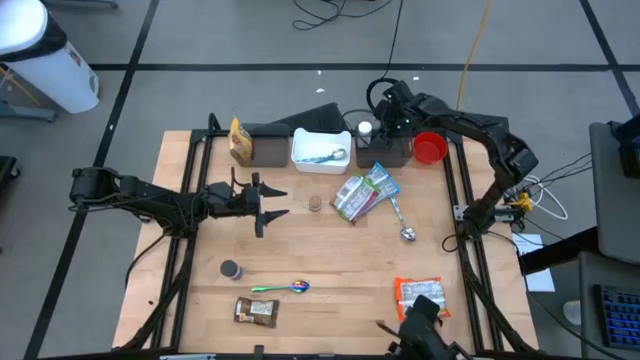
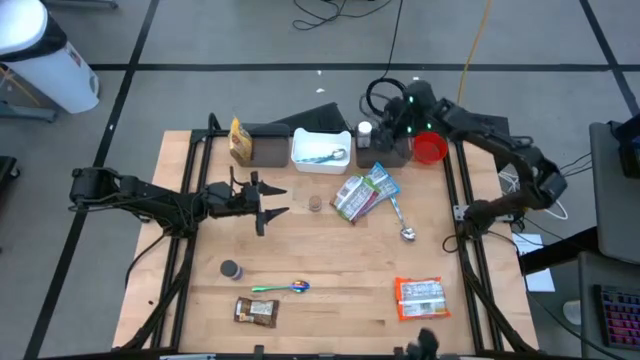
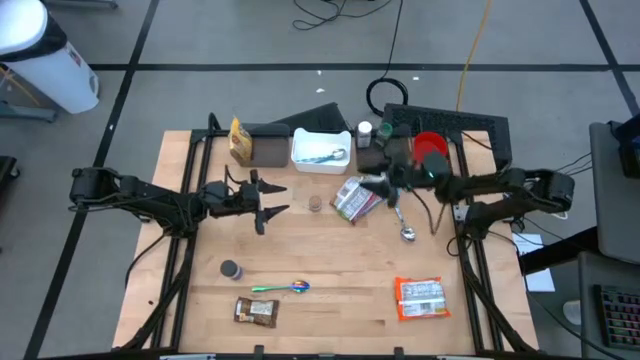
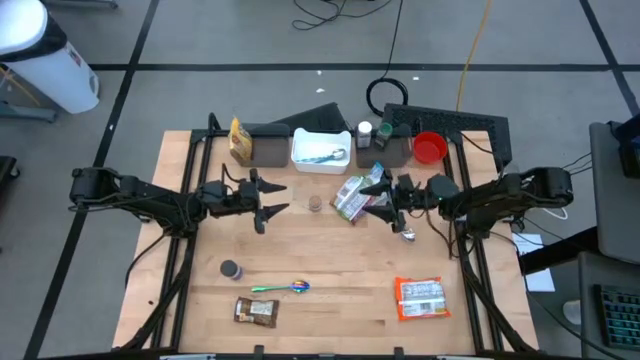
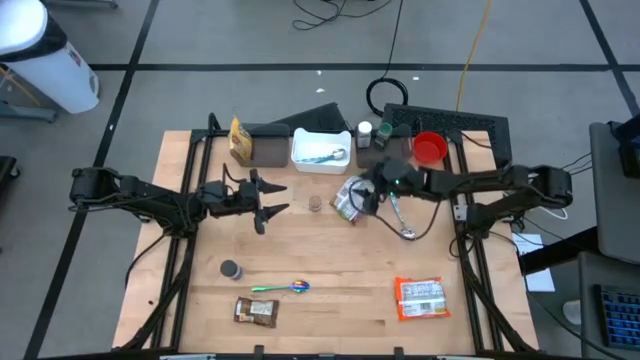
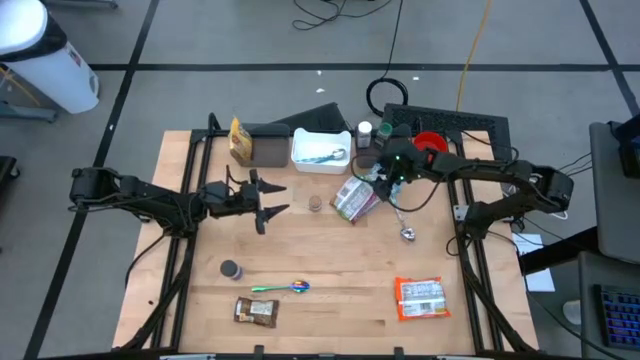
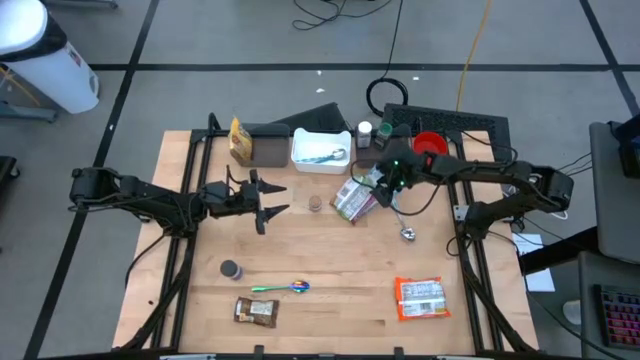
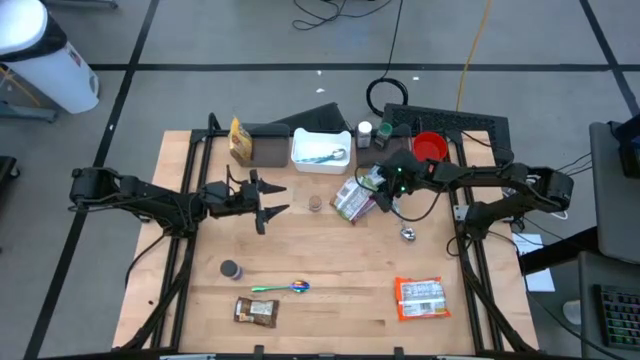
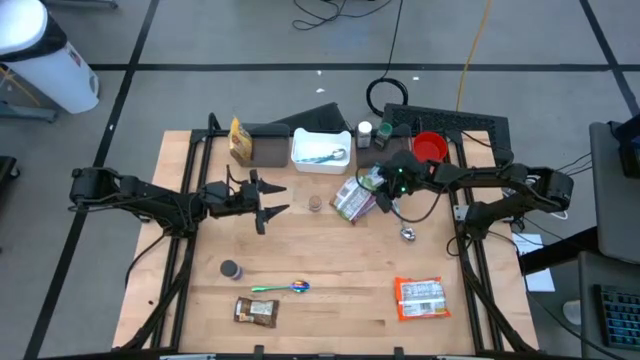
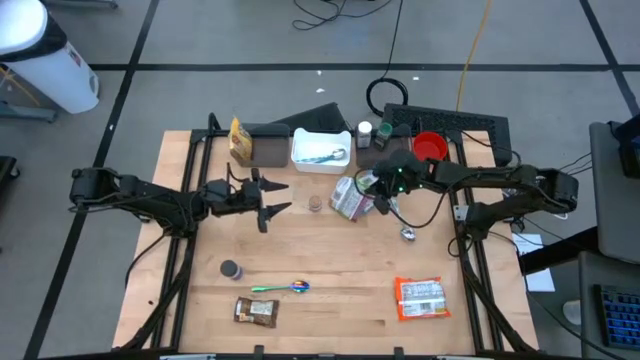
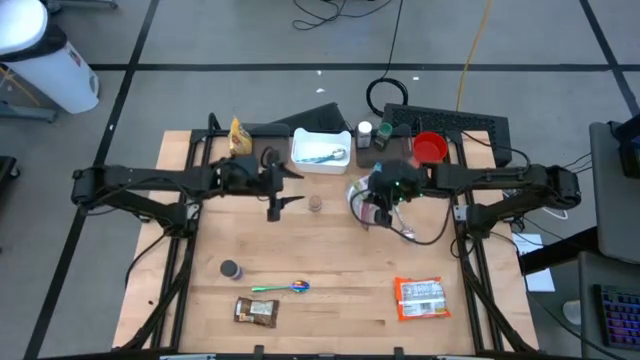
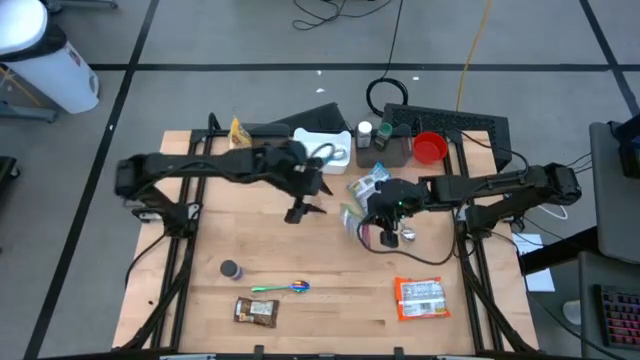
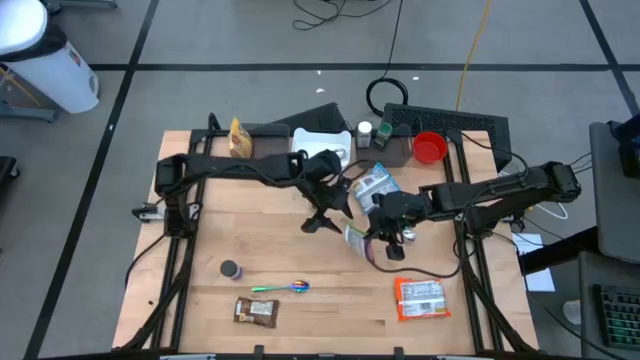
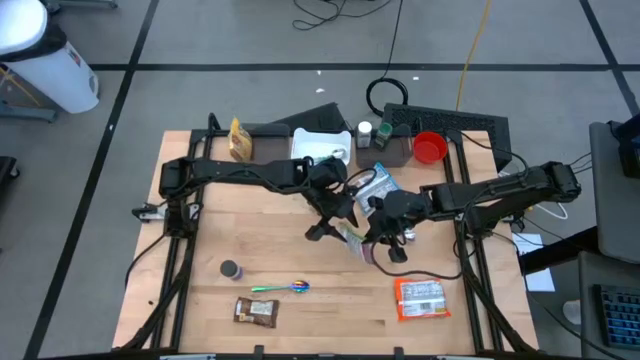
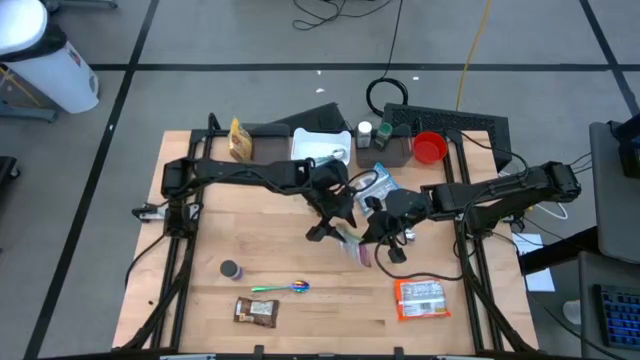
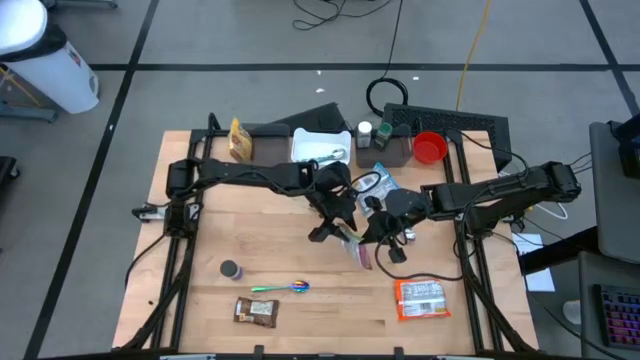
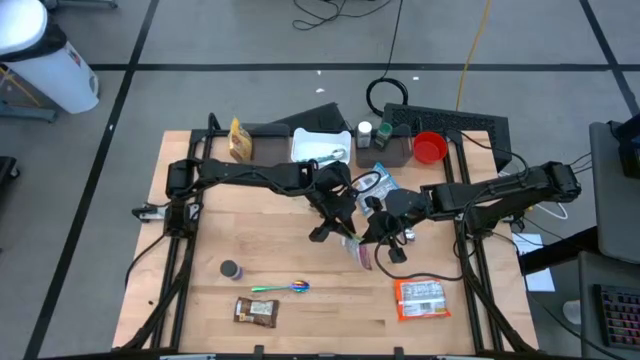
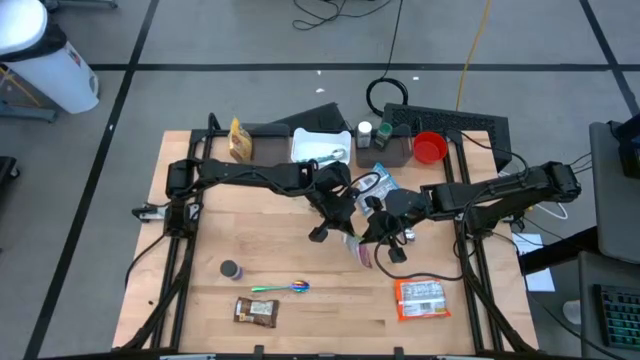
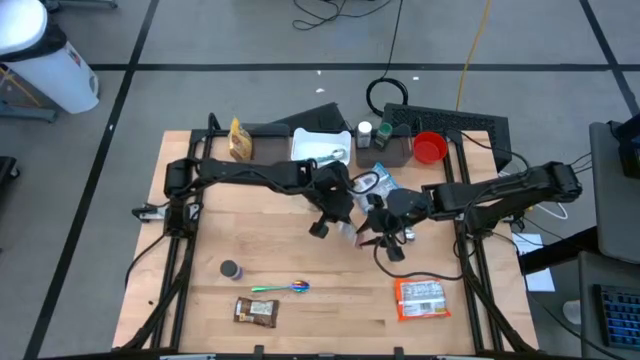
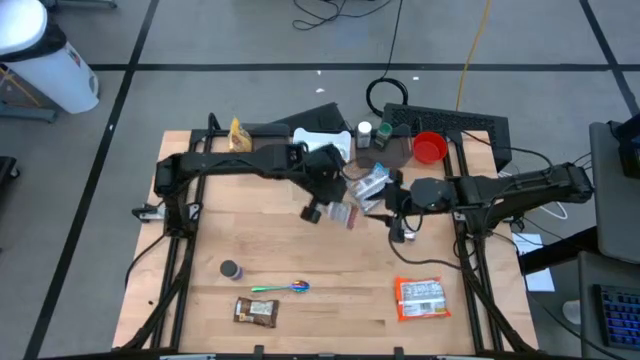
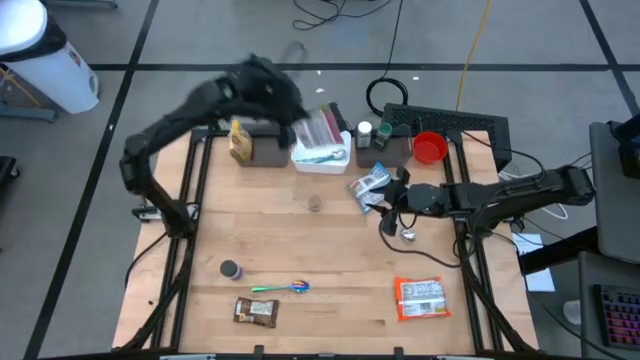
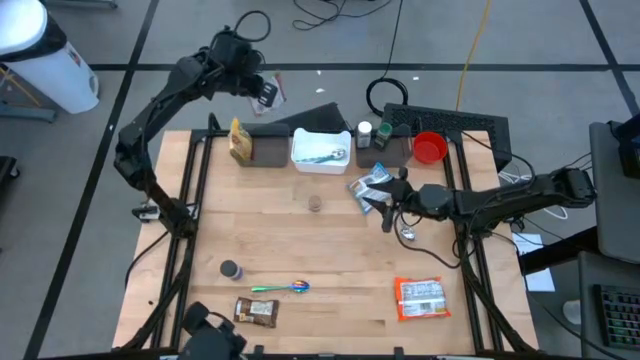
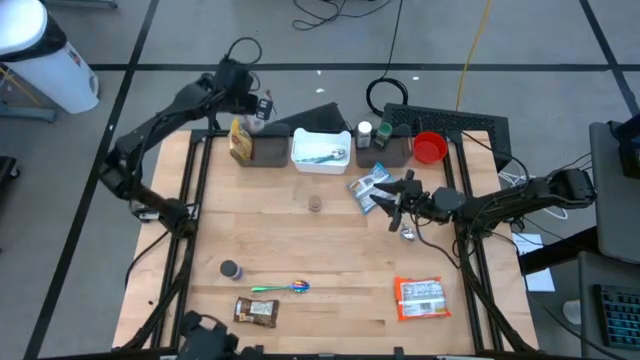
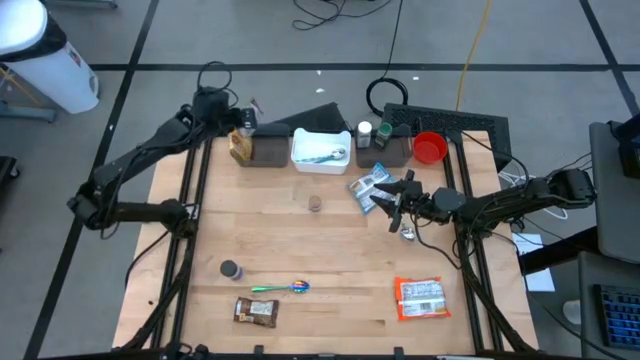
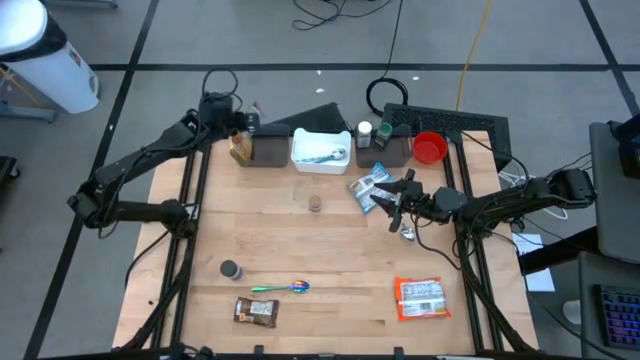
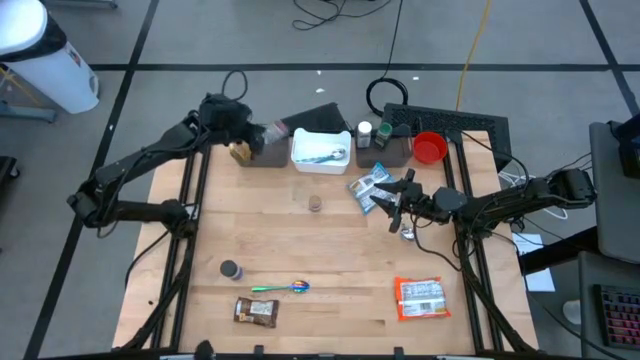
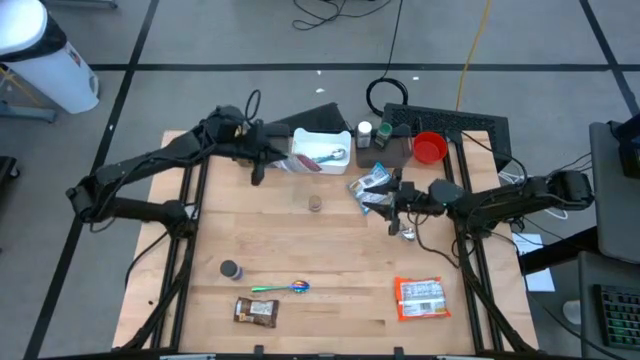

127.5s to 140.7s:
Task: Pick & Place Food Item
Put the green noodle pack into the left black bin

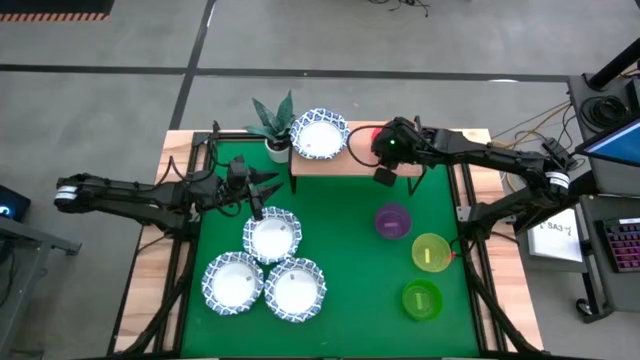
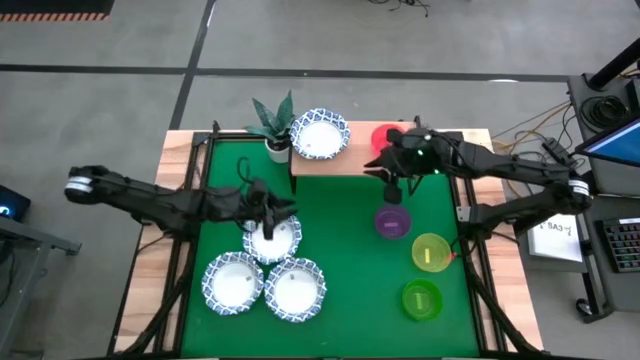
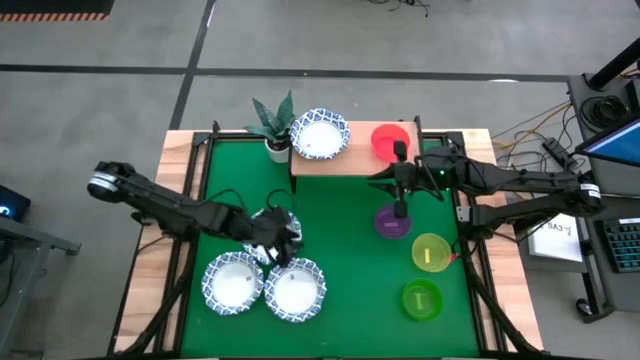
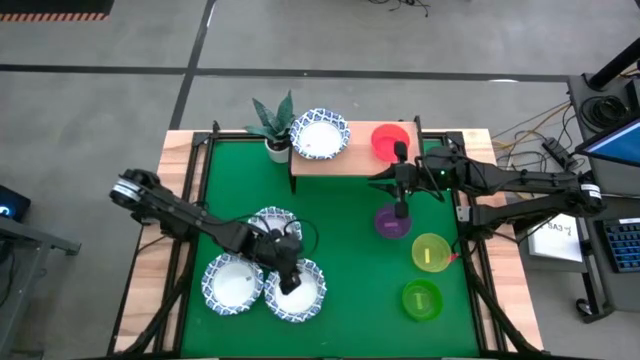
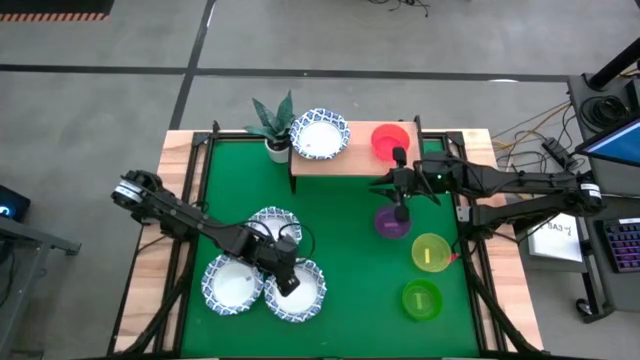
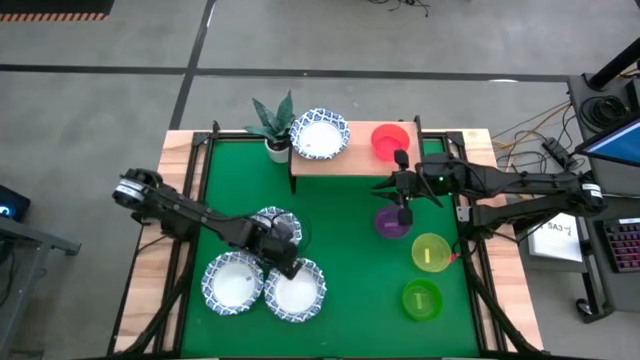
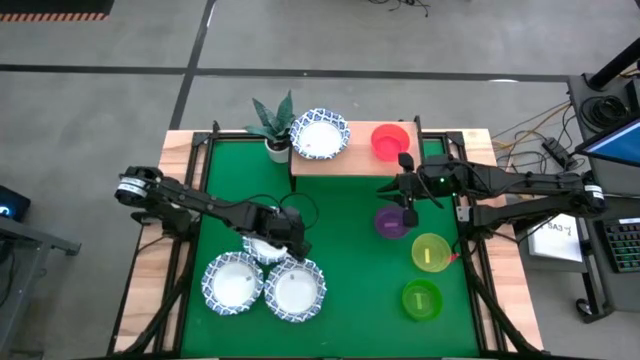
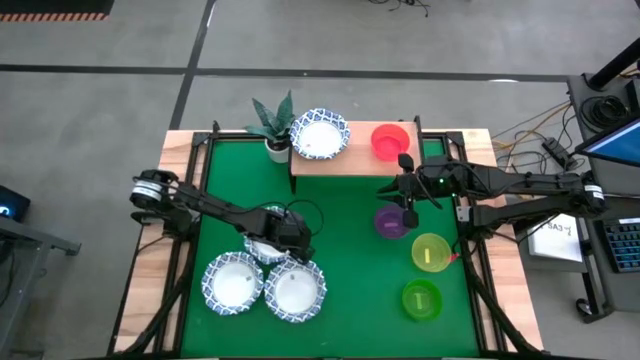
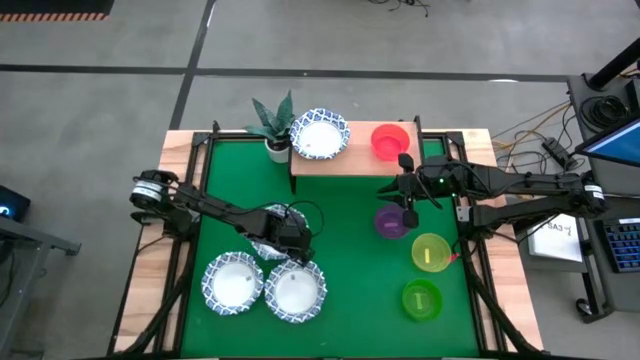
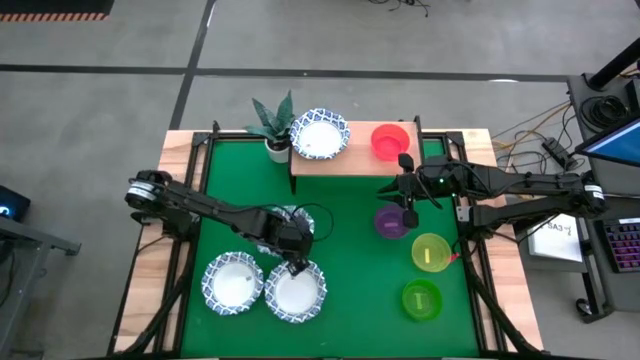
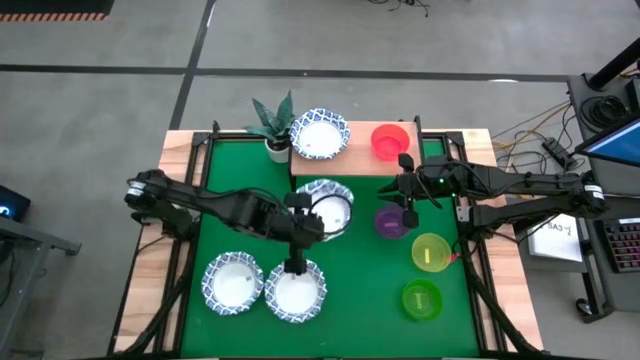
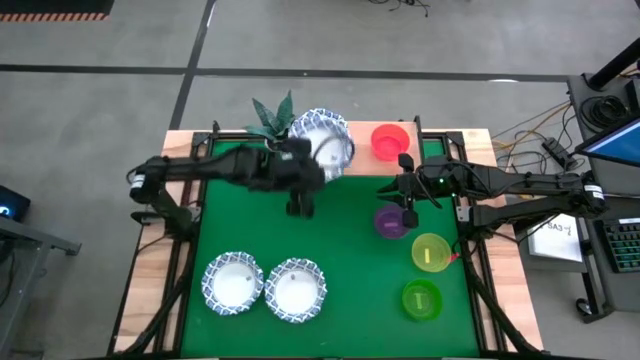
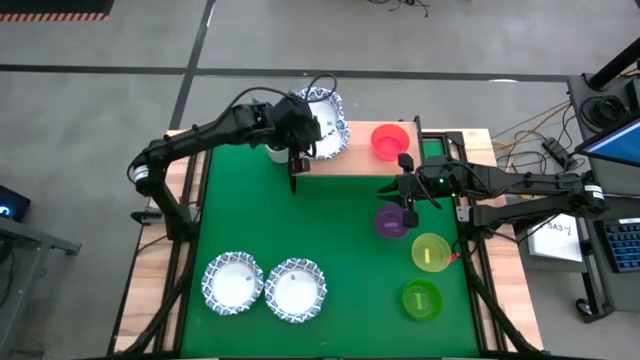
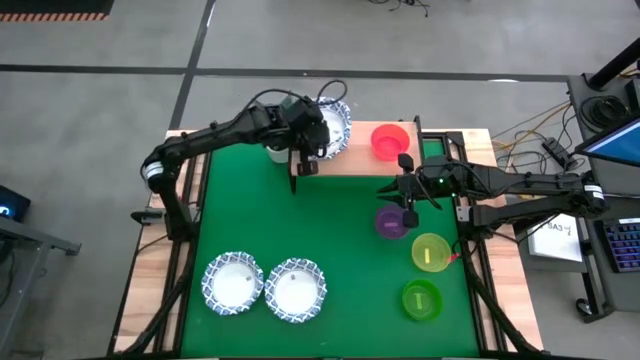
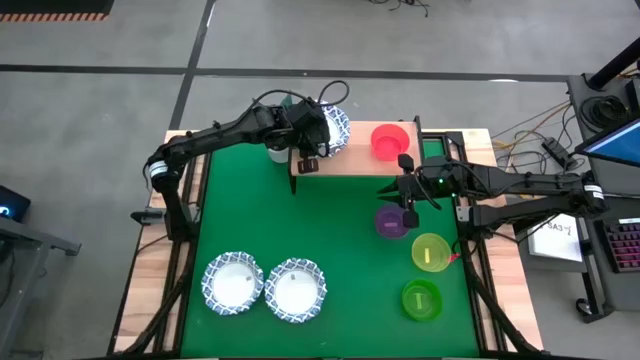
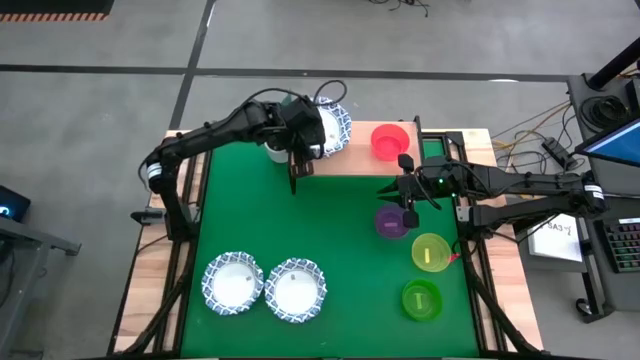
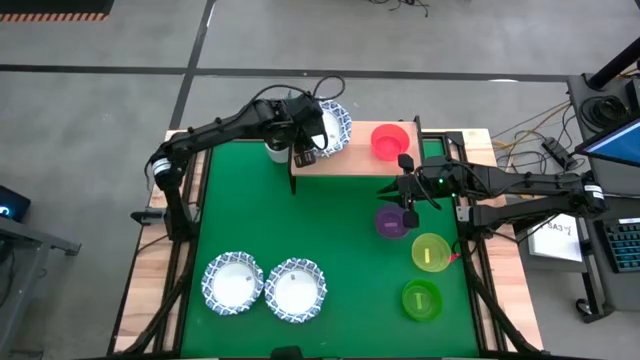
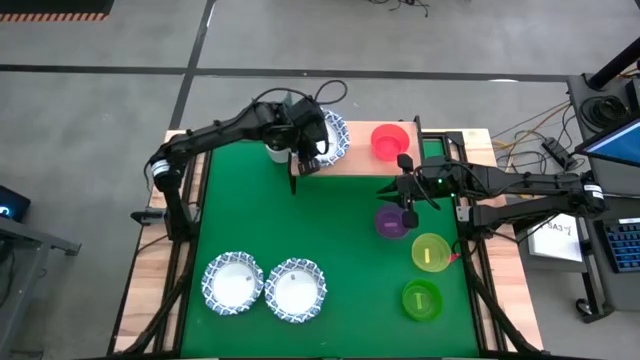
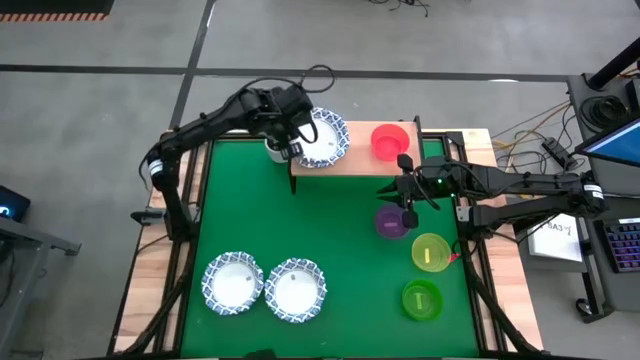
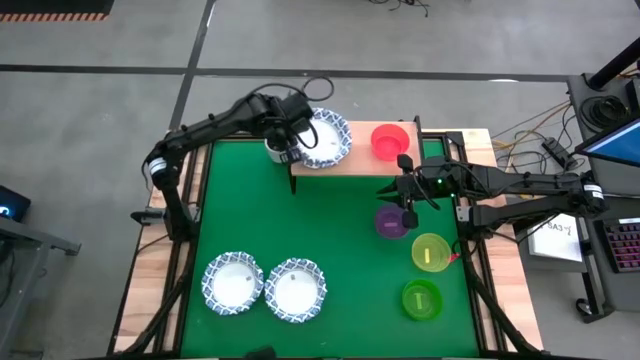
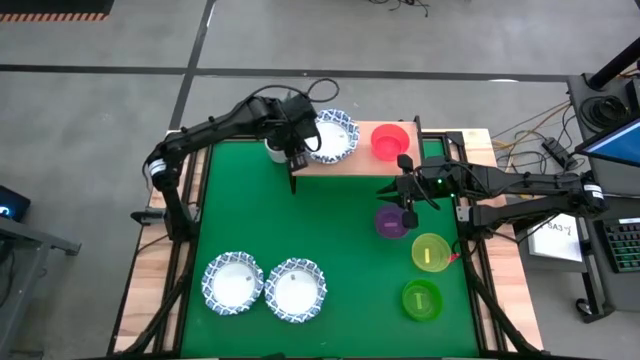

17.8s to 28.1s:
Task: Place and stack bowls onto a shelf
Stack the white patterned bowl on top of the white patterned bowl on the shelf
